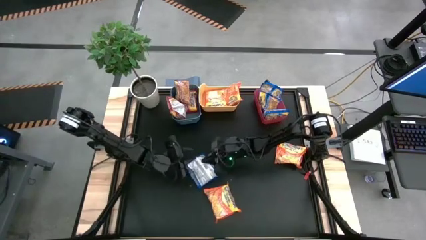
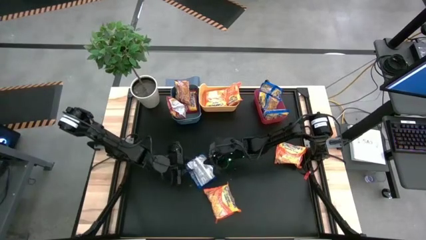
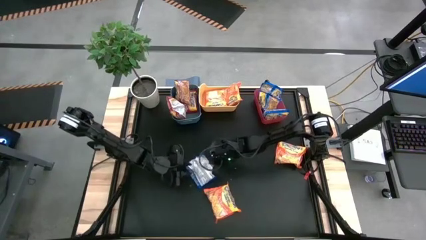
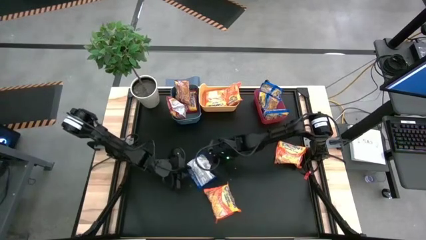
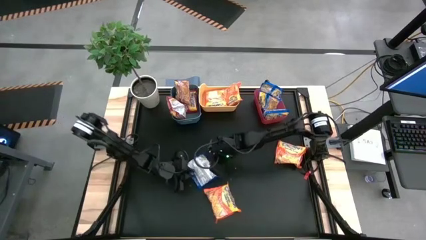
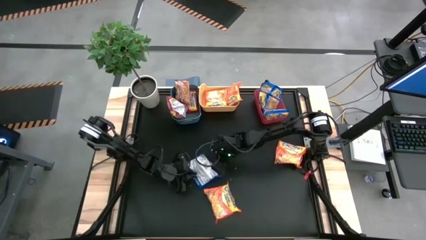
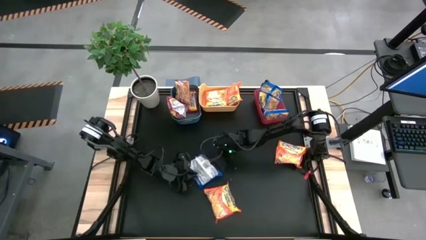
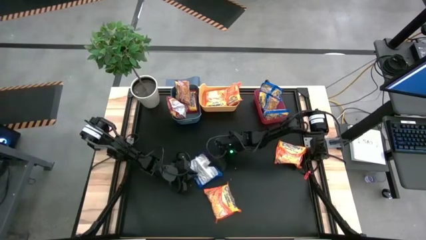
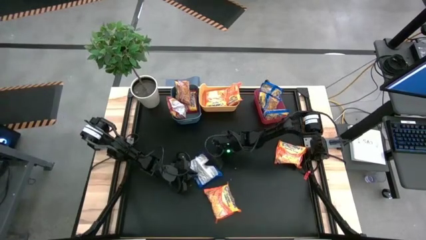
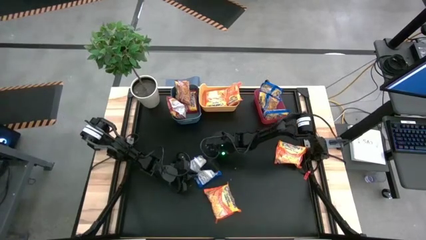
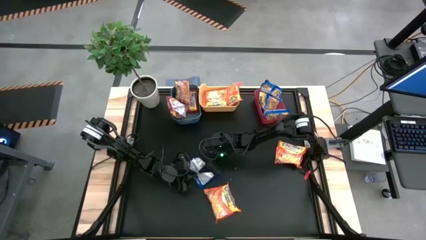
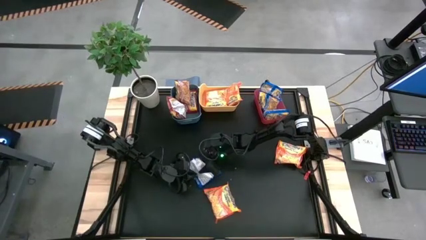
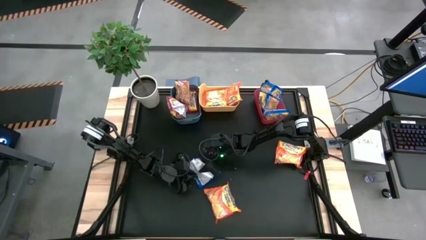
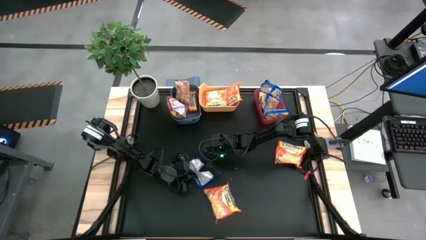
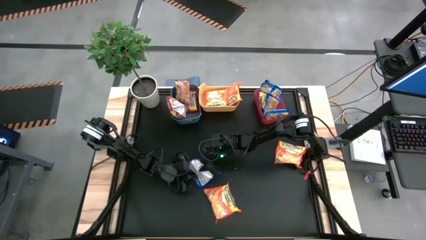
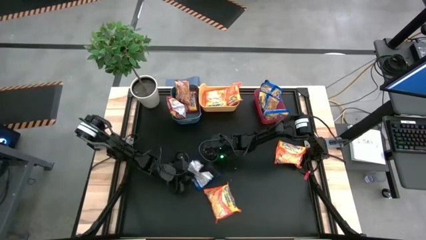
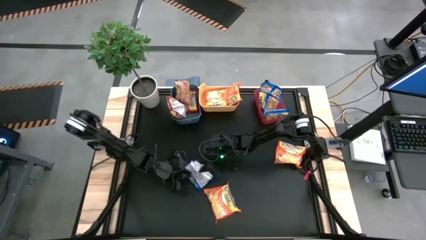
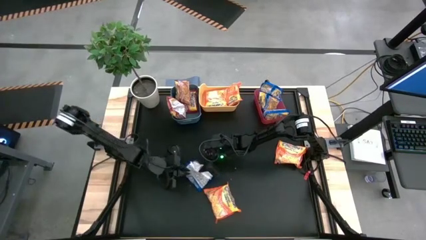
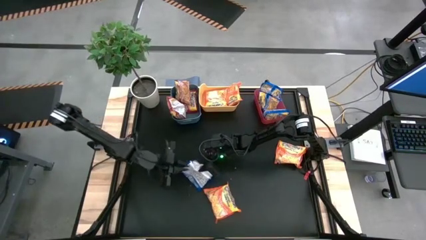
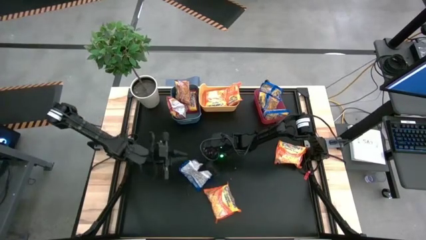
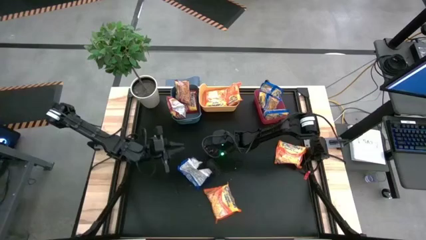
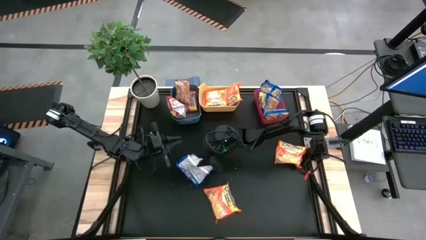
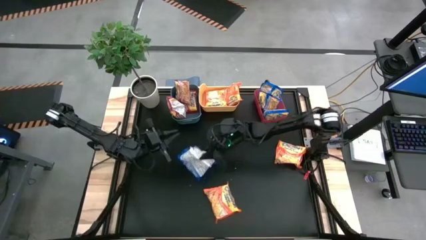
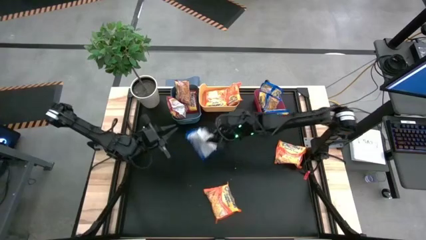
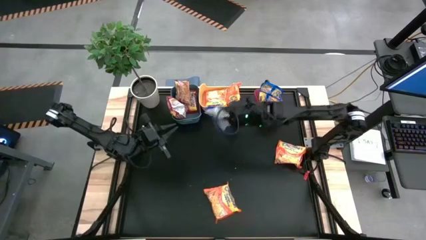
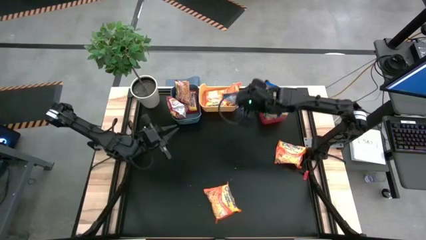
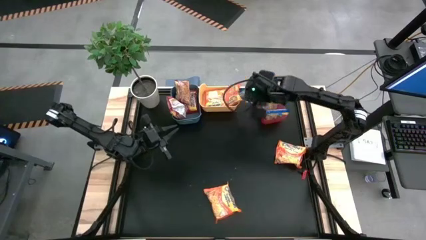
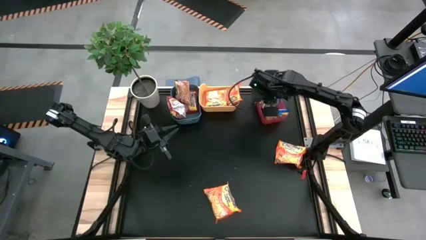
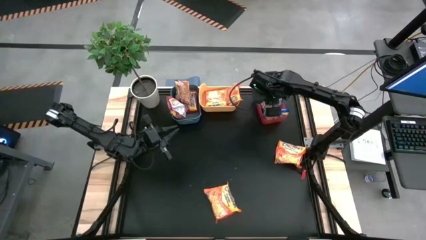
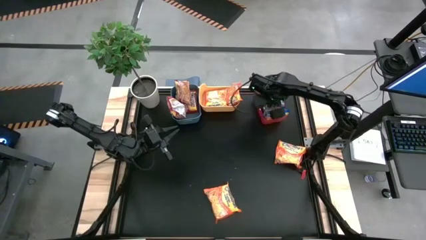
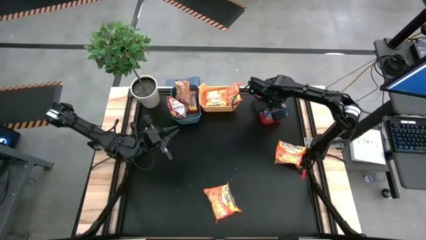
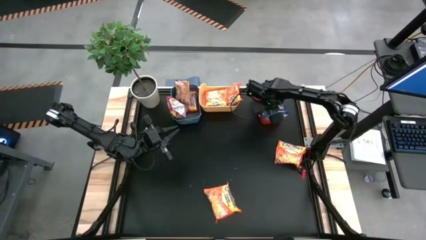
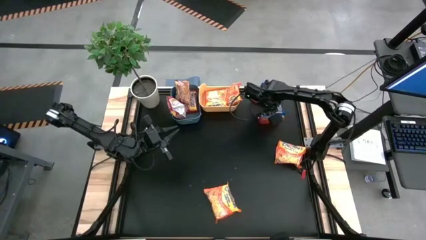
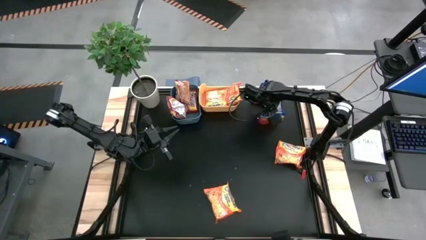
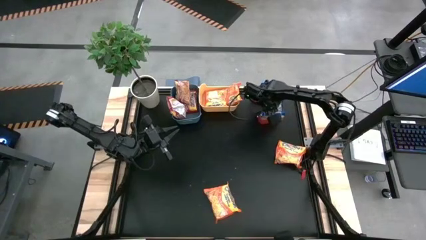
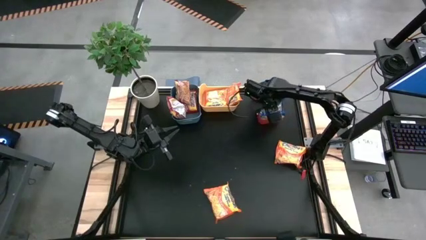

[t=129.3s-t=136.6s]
Task: Sort Maruchan noodles
Put the blue noodle pack into the red bin

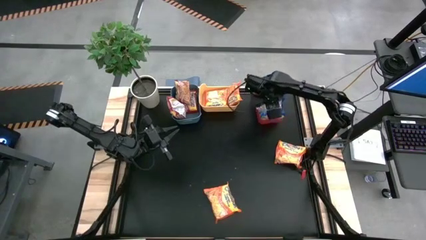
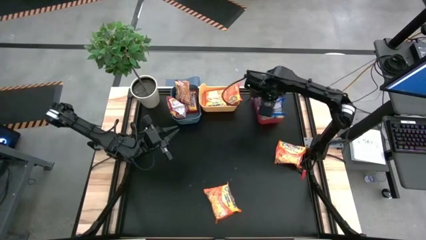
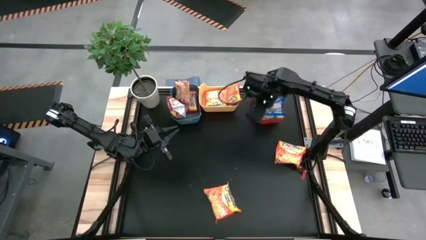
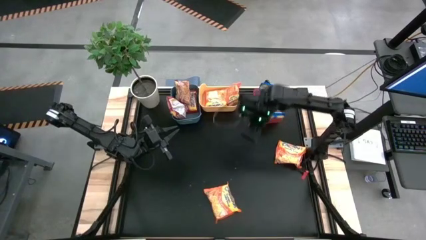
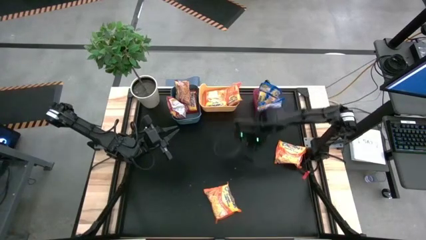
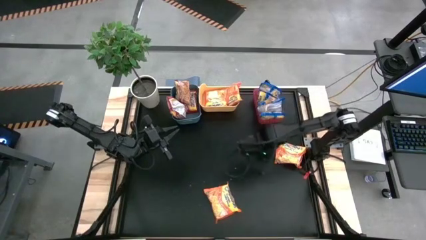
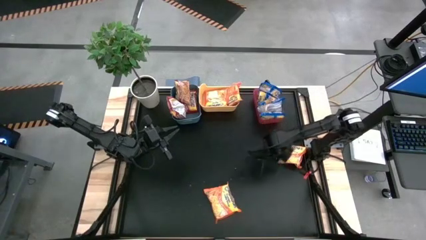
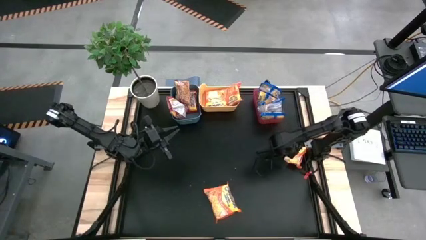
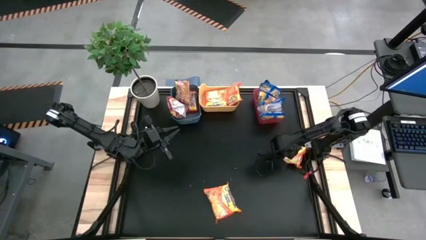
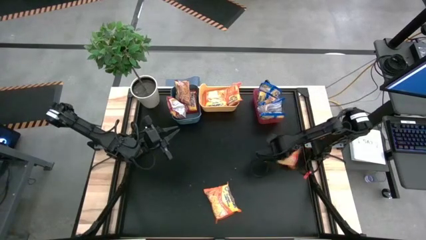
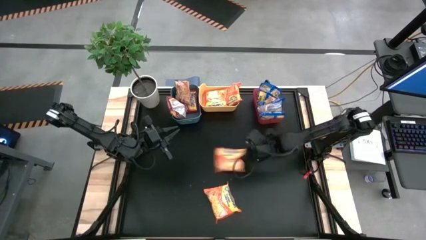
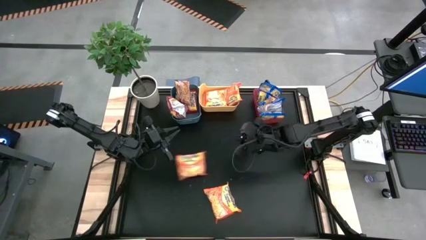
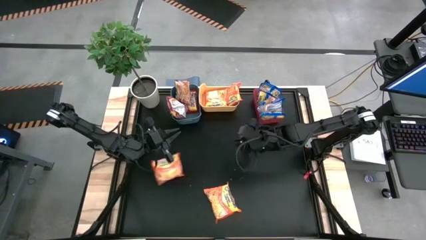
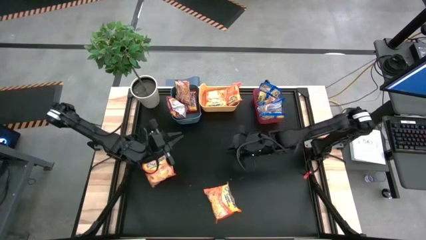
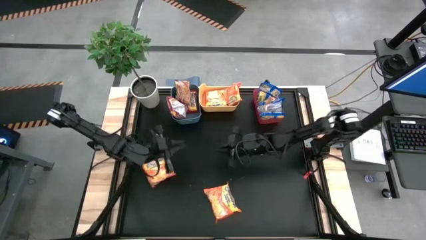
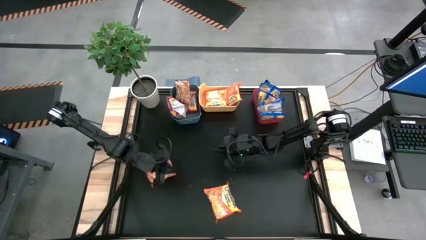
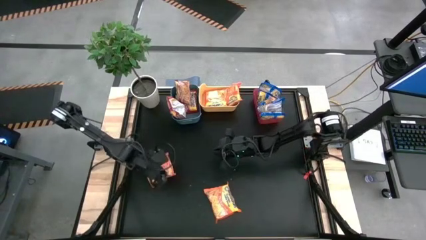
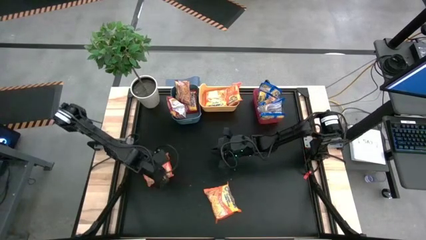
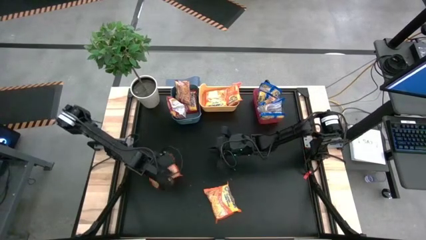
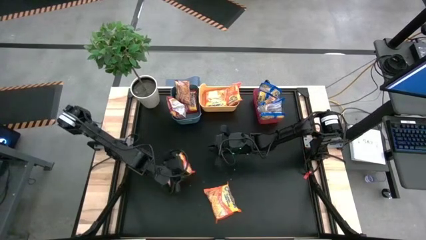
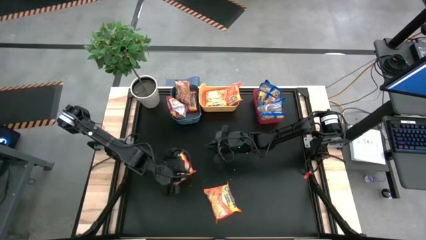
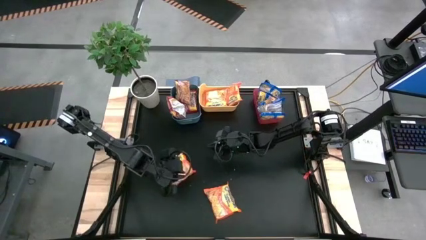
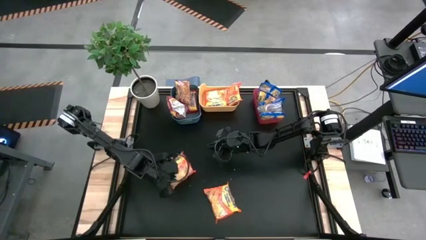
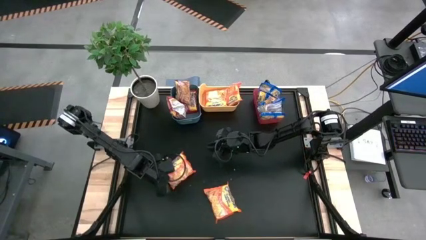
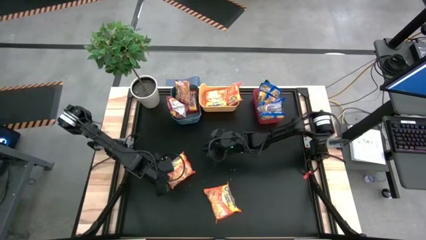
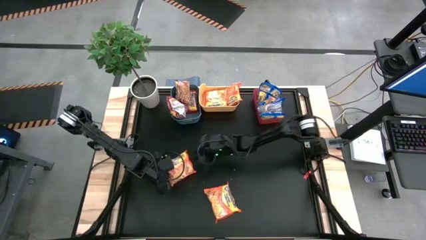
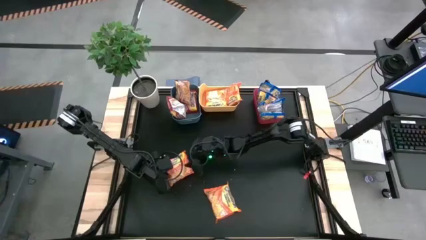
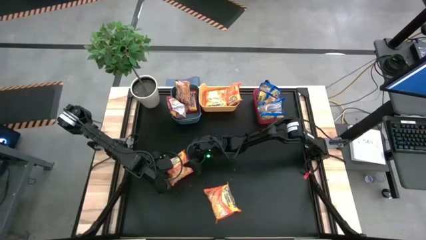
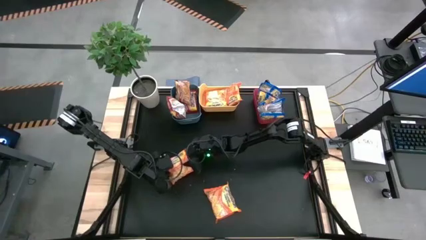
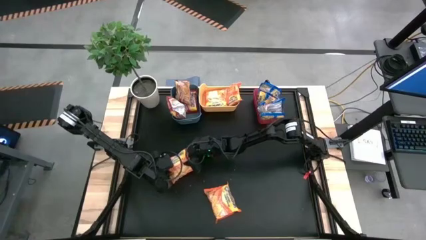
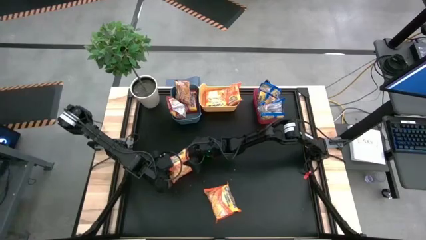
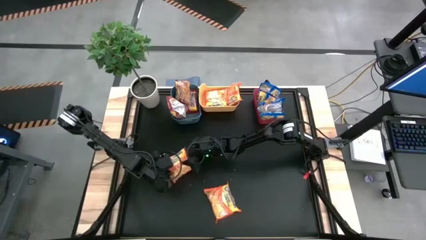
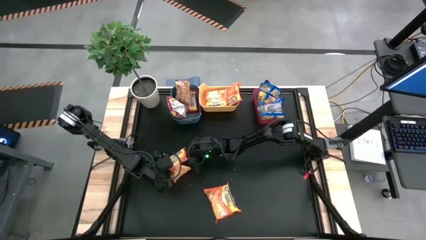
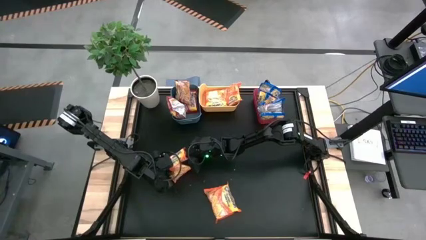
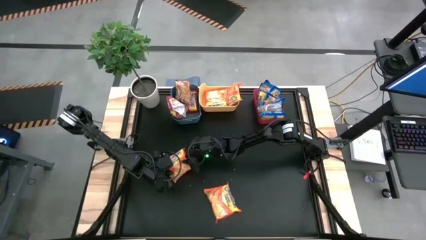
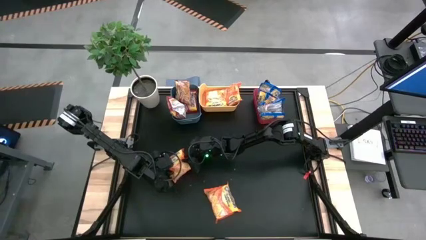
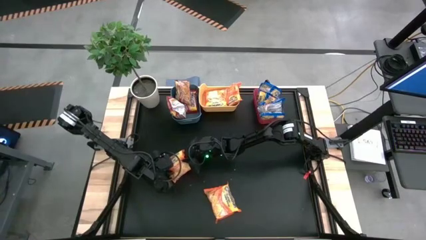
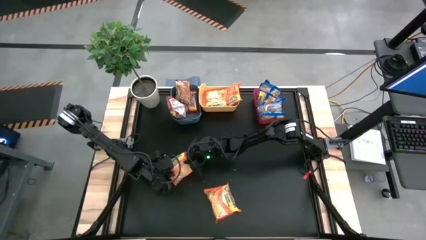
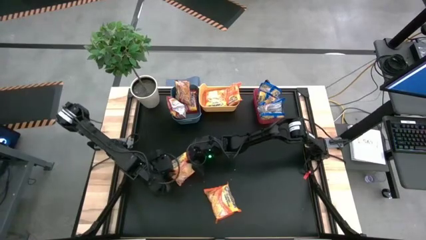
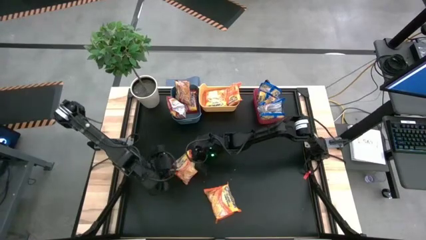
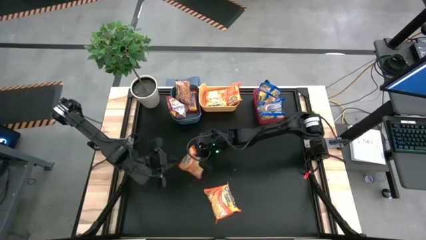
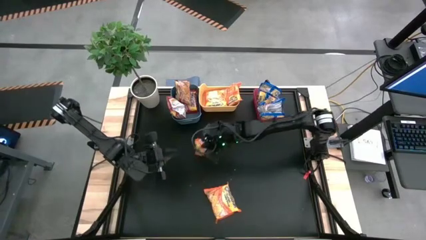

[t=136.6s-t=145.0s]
Put the orange noodle pack into the yellow bin
